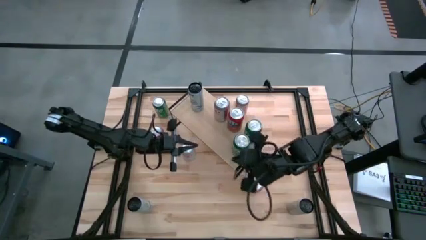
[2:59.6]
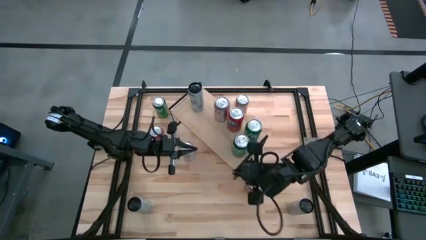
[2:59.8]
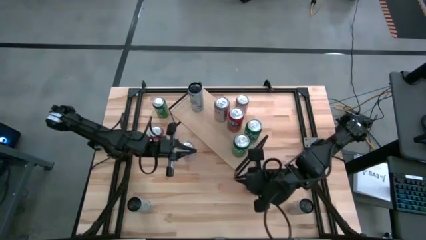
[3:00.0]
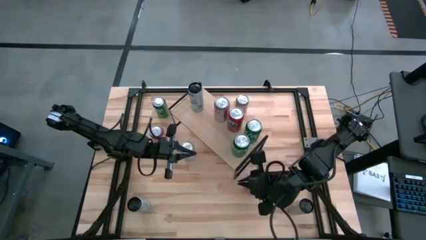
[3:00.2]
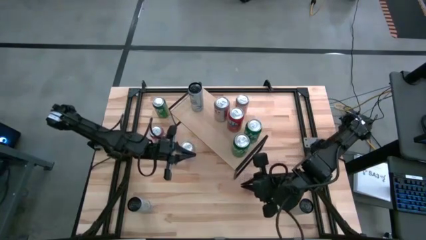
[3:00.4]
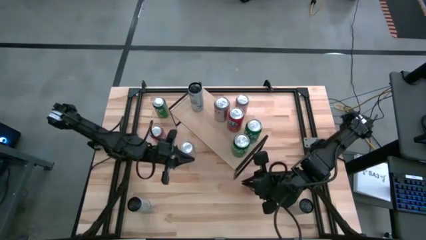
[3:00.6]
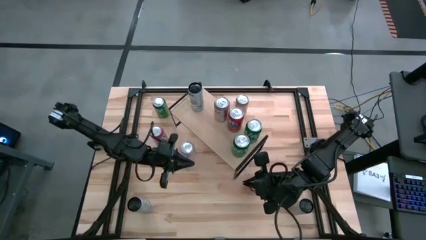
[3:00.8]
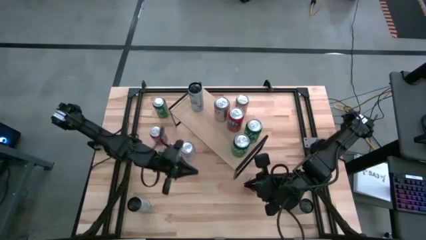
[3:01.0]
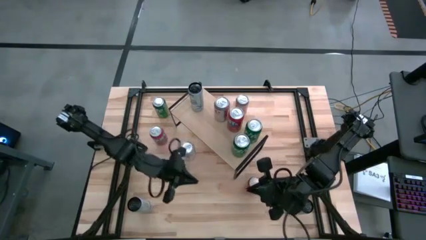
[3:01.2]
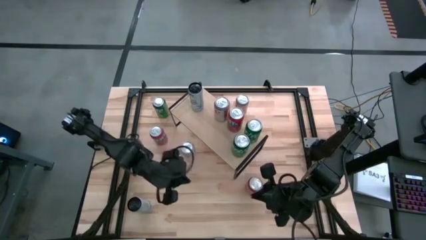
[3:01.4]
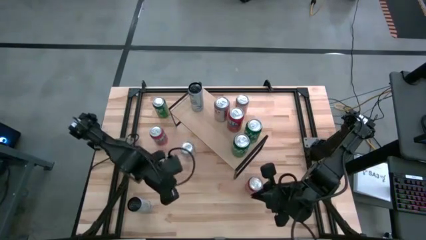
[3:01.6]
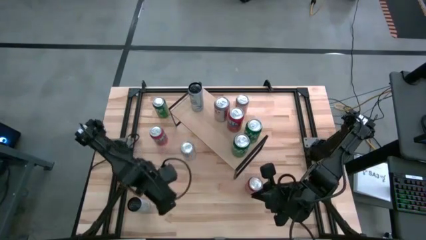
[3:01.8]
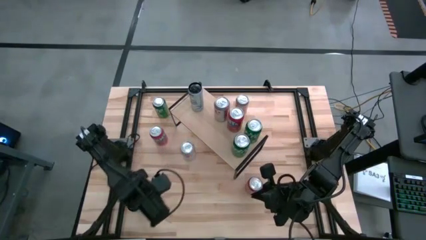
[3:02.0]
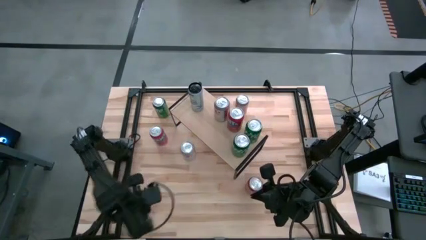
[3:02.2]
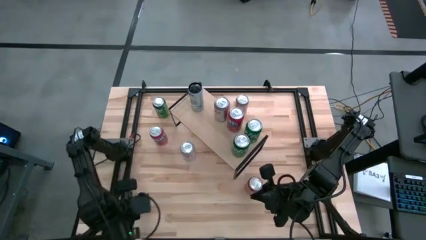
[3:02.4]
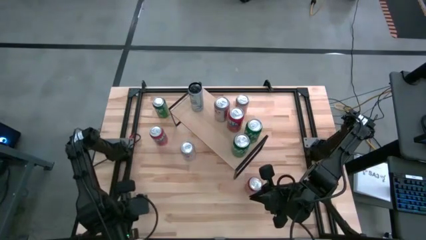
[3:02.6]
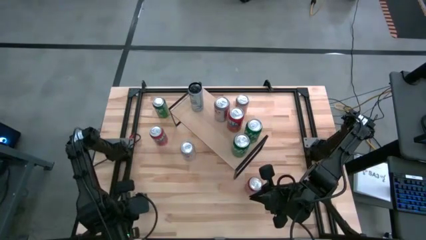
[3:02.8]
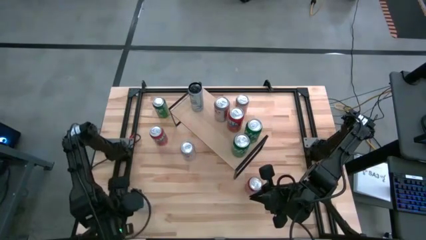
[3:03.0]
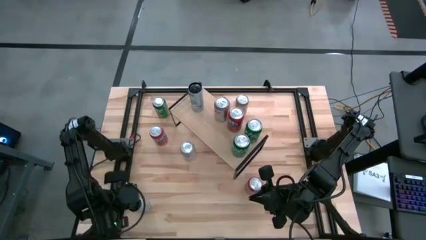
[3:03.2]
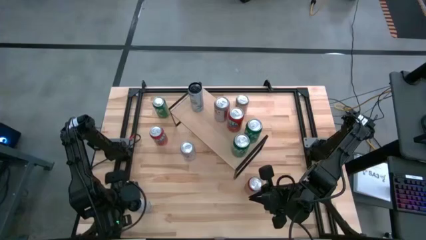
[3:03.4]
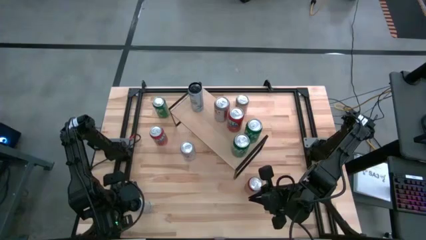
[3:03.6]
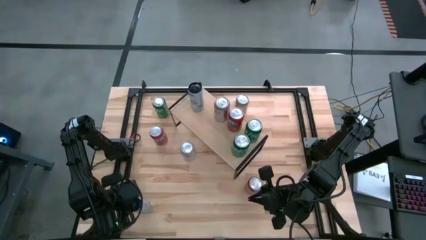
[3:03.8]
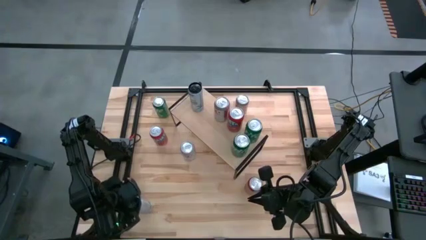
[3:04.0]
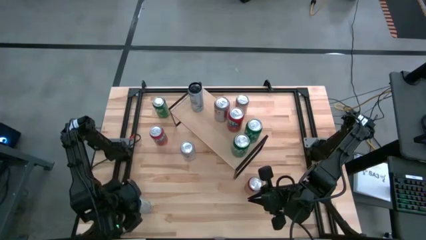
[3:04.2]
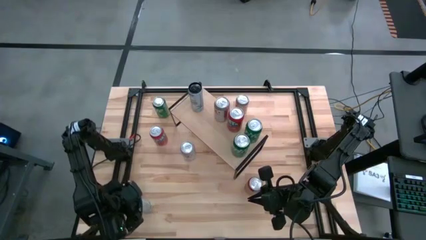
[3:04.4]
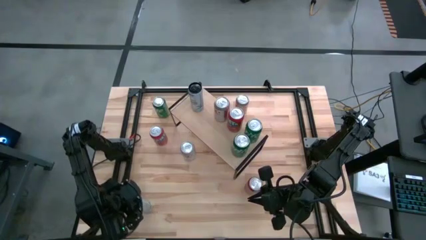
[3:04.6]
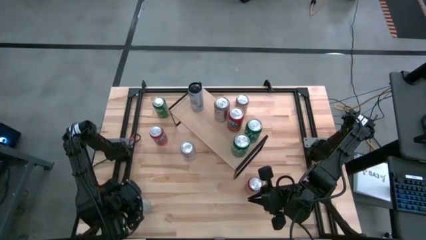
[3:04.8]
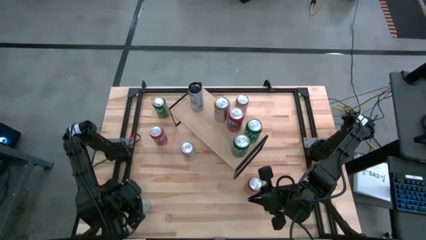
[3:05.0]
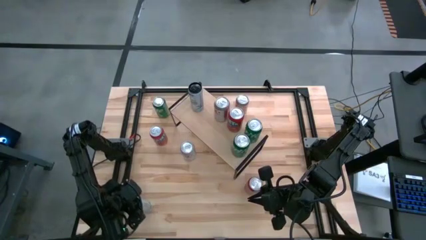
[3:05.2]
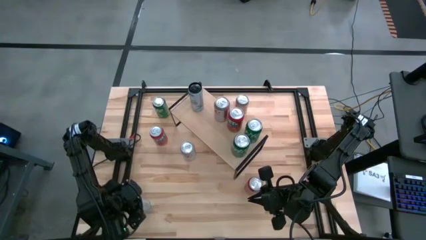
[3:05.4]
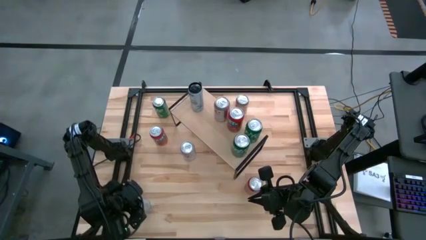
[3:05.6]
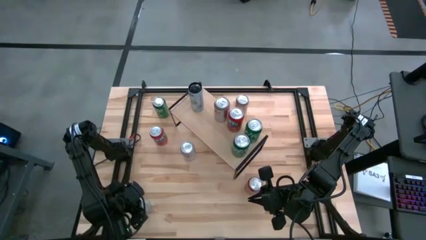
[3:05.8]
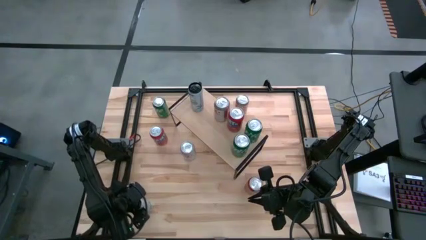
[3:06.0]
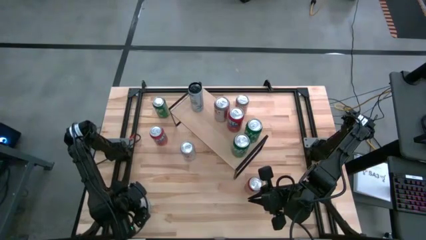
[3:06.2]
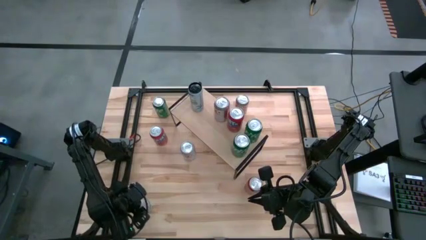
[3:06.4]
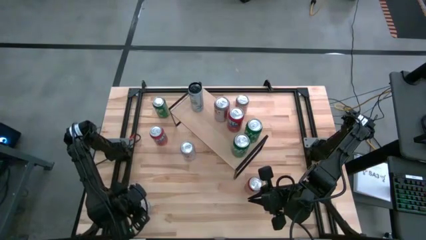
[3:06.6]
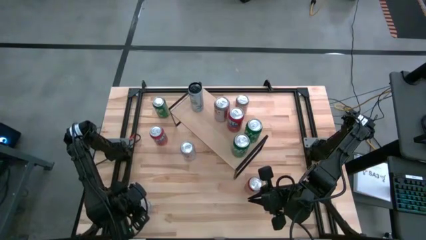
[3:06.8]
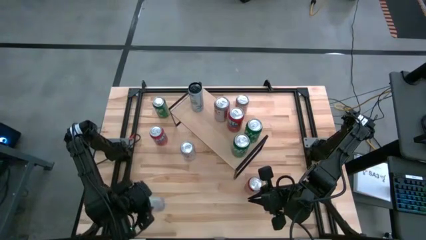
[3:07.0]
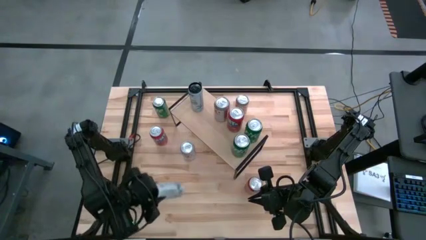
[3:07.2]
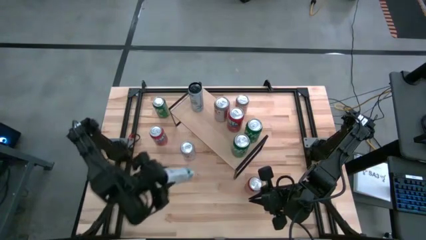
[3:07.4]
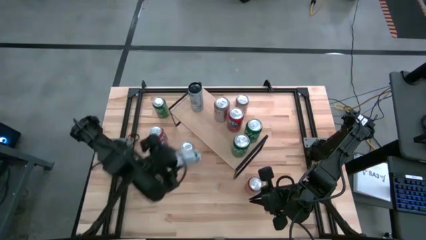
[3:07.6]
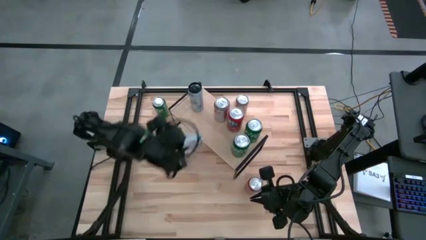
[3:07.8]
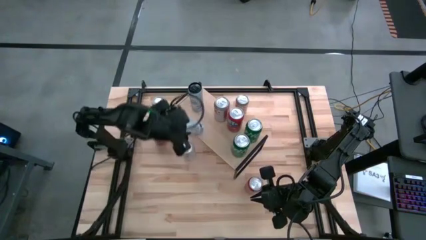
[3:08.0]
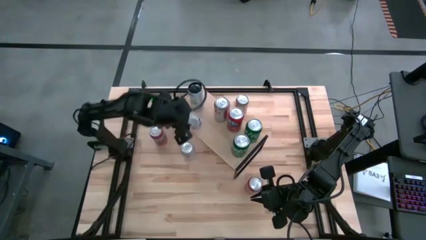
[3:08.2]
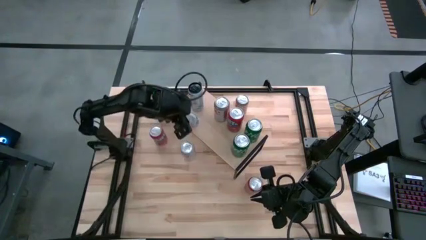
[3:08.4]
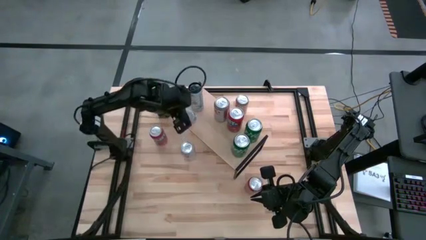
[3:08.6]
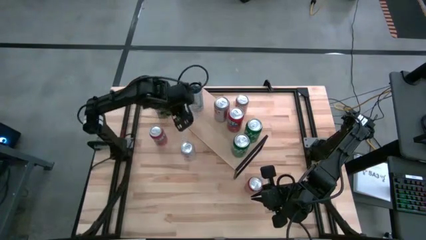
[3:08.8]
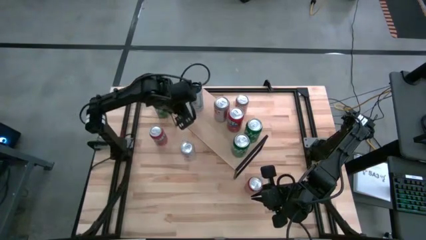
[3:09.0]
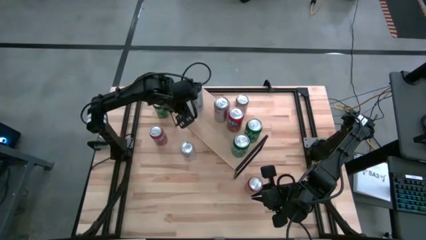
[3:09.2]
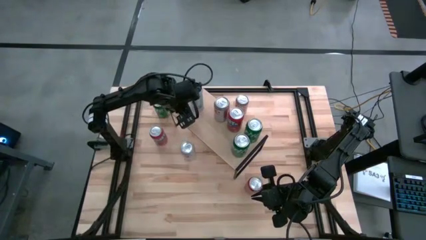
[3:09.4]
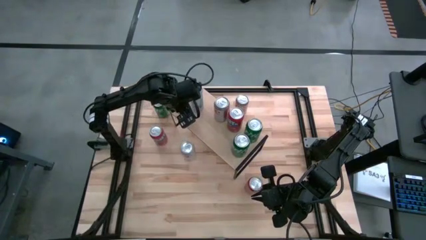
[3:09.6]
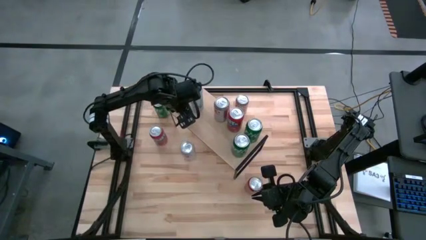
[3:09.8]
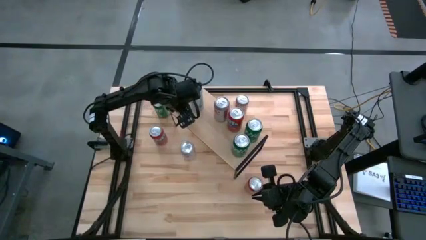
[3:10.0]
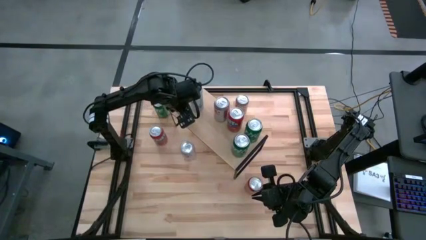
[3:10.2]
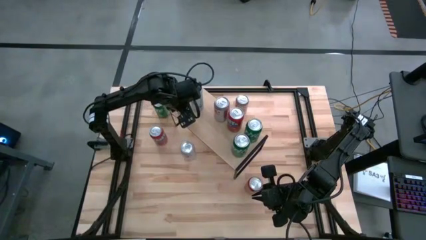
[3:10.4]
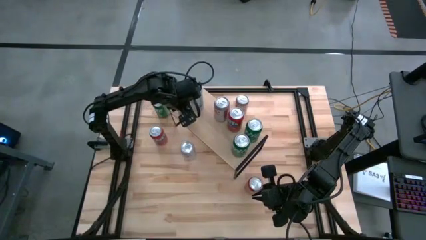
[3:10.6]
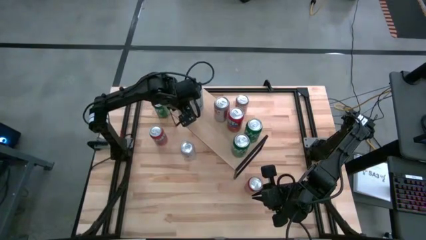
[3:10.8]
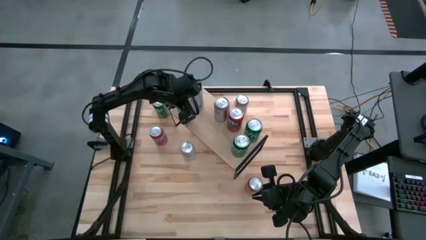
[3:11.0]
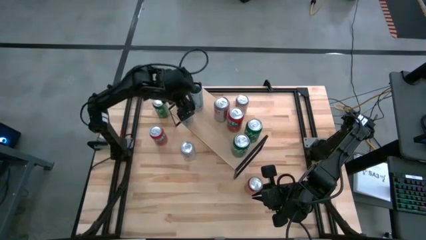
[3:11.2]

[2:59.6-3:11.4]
Task: Place canned beverage on shelf
Put the blue soda can on the shelf aligned with the other blue soda can

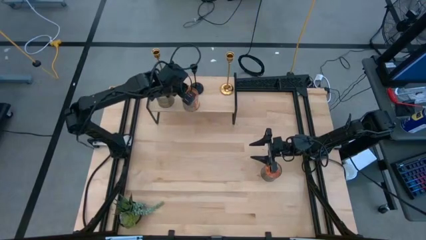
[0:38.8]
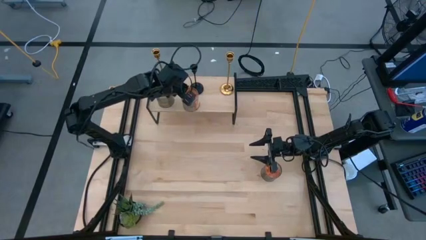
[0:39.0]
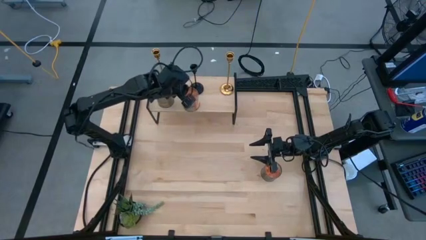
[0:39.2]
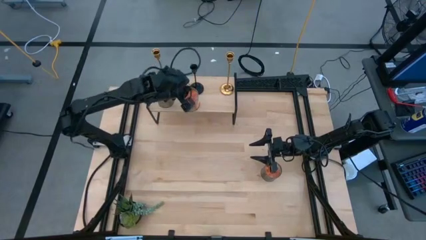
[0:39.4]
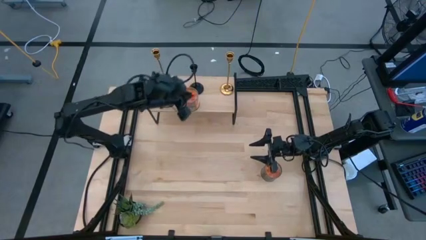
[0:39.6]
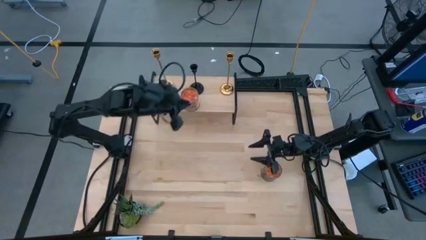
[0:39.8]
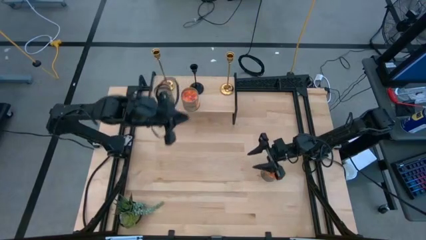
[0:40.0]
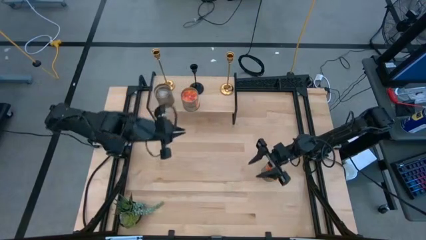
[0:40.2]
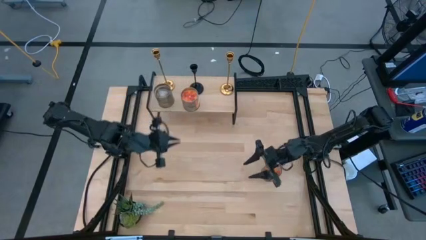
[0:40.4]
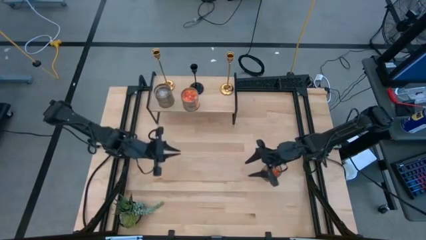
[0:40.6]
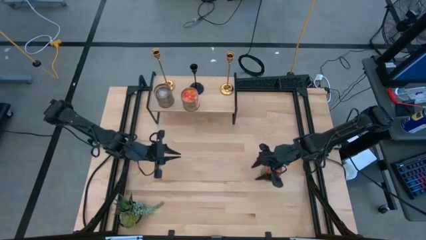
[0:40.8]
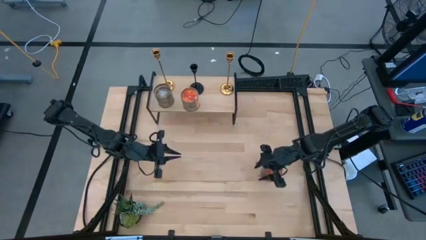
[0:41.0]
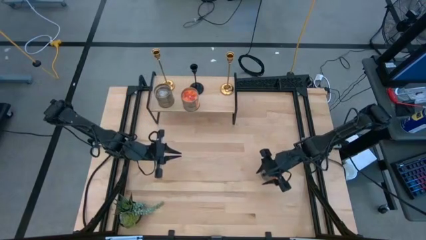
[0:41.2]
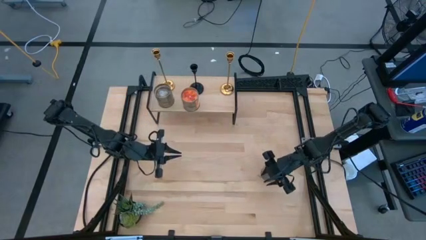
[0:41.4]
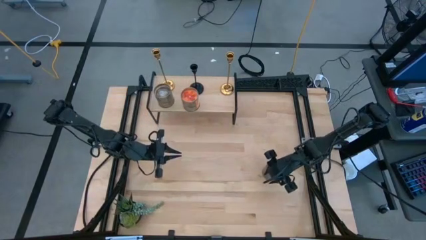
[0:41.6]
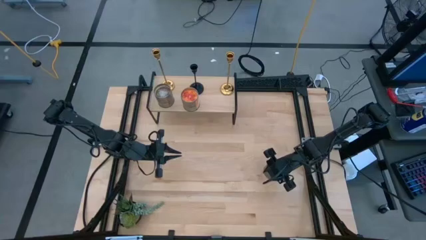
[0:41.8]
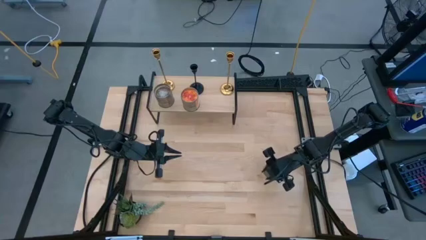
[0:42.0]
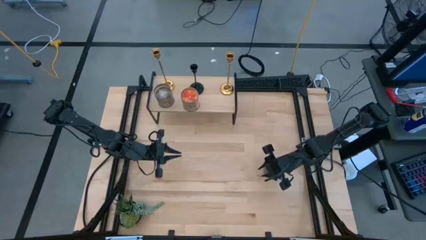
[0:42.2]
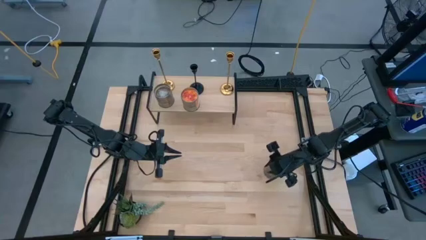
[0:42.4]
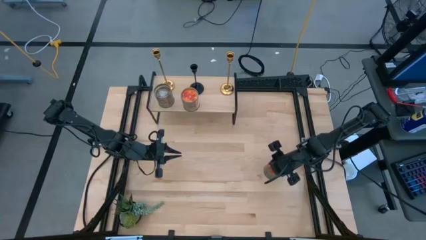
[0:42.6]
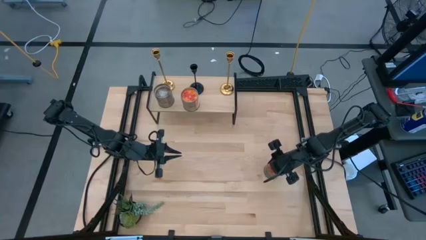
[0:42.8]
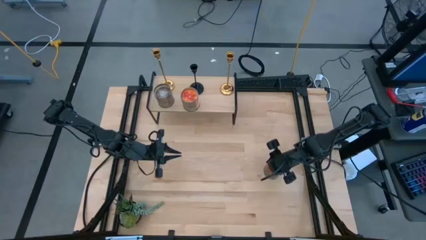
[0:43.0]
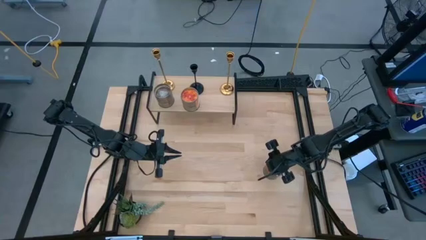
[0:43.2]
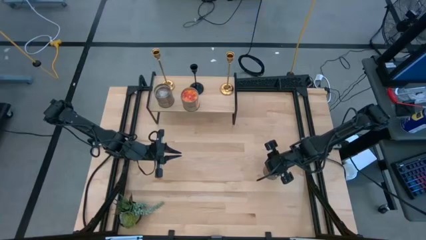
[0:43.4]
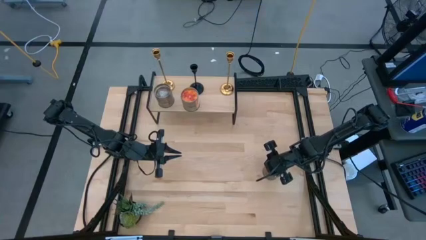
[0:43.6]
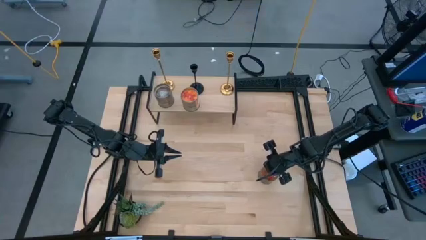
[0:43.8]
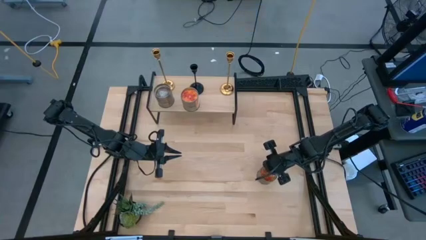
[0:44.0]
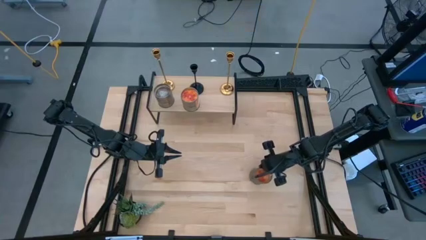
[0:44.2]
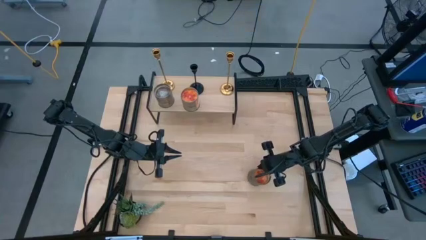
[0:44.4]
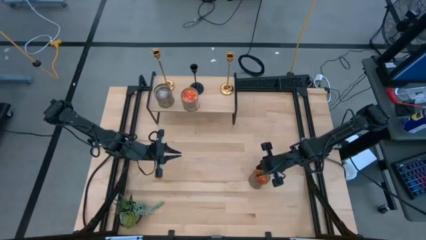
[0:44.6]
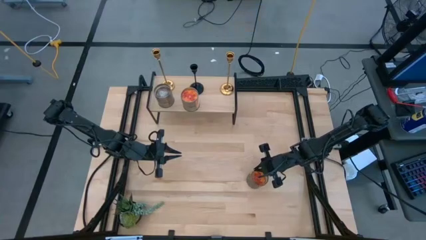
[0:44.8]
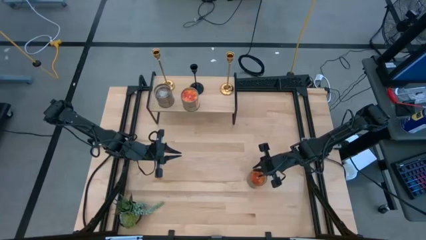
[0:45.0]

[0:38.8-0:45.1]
Task: Pick & Place candle stick holders
Put the orange scented candle on the shelf
